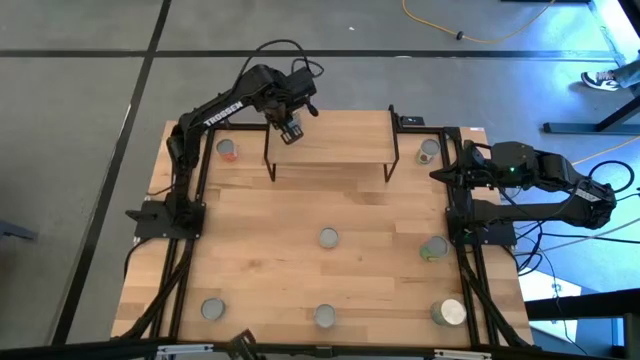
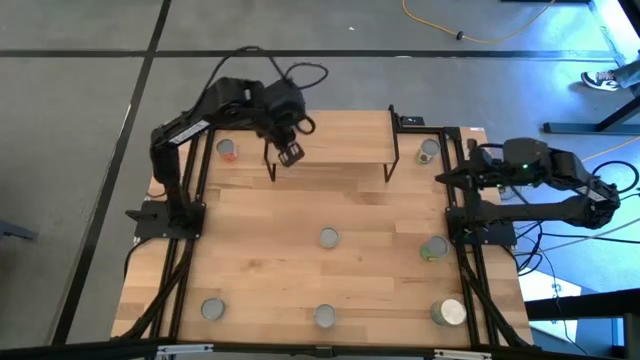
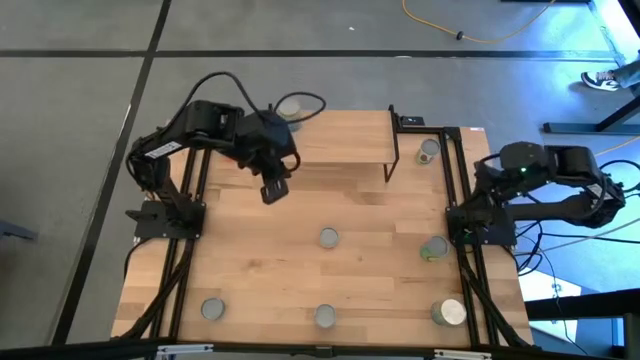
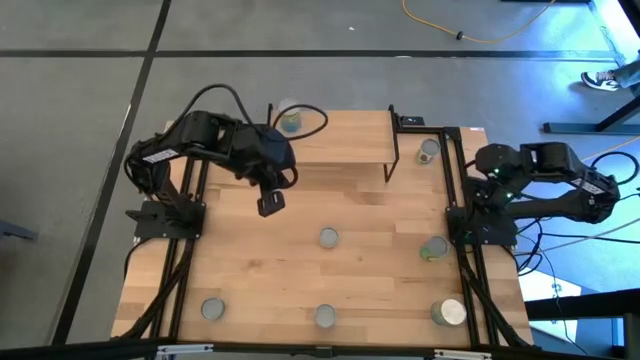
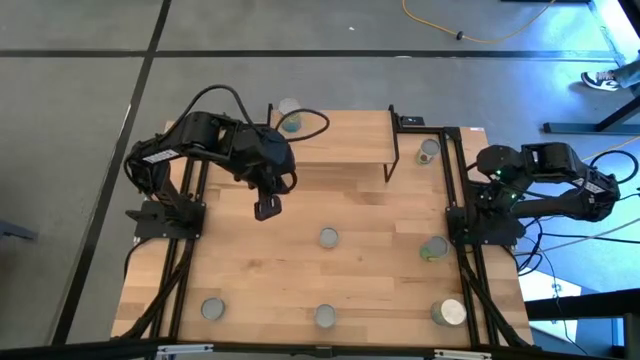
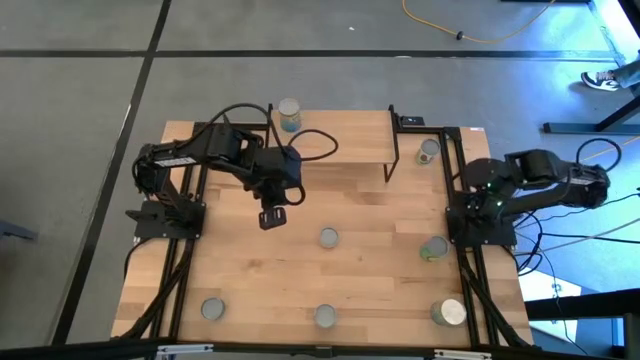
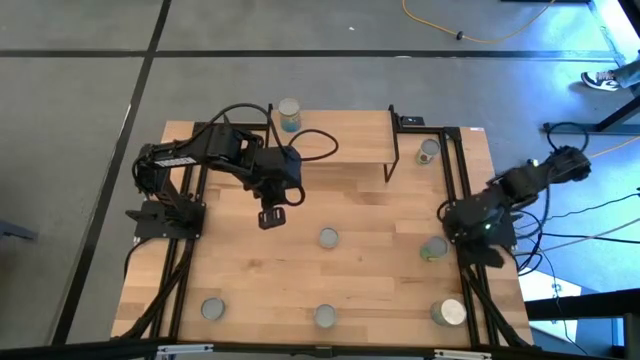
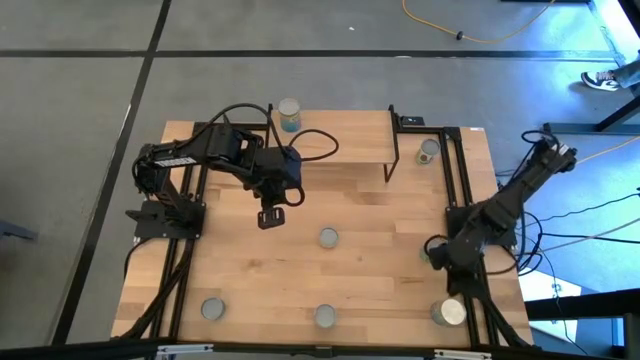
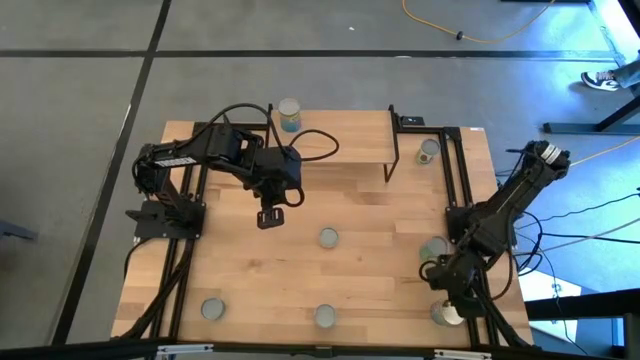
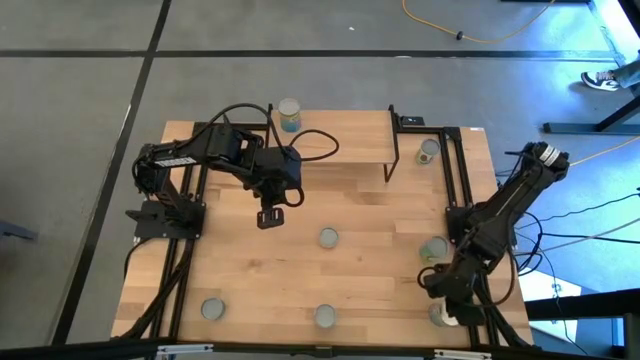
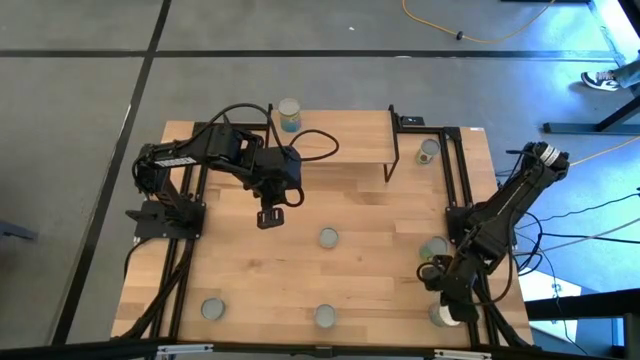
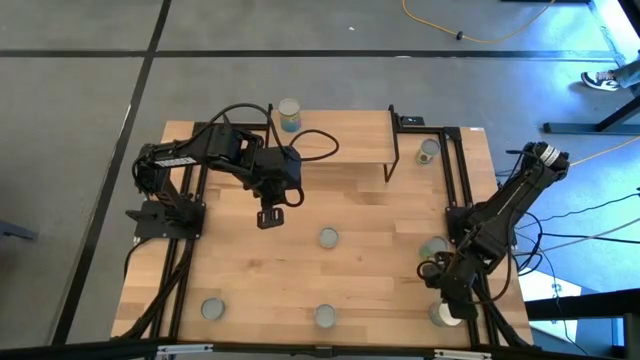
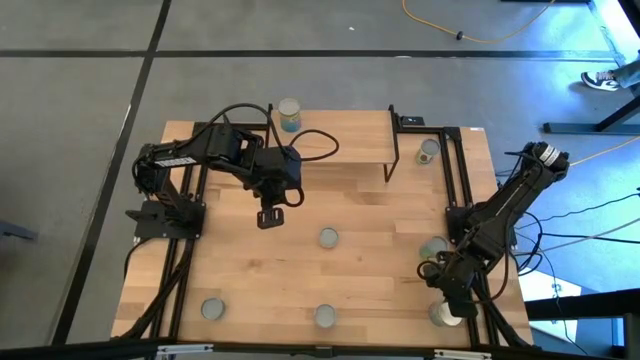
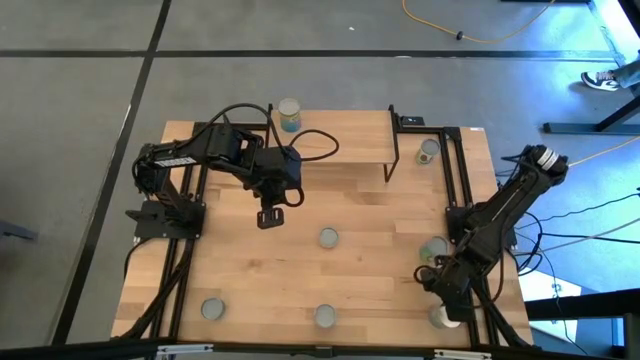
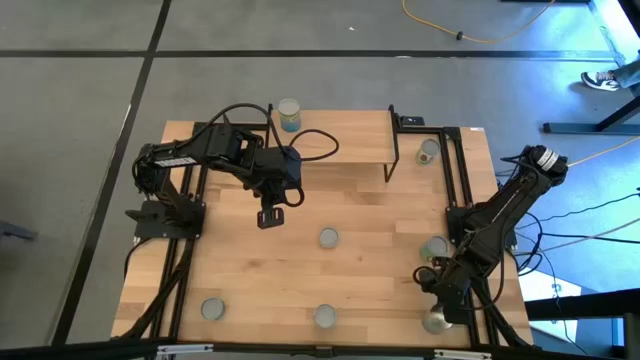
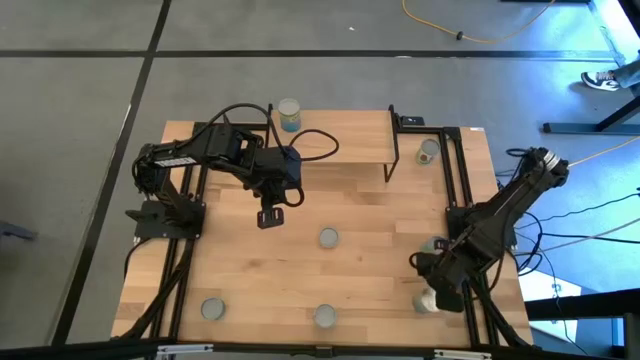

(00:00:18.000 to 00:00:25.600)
Task: Pick and place cans onto a shelf
Put the canned cherries on the shelf

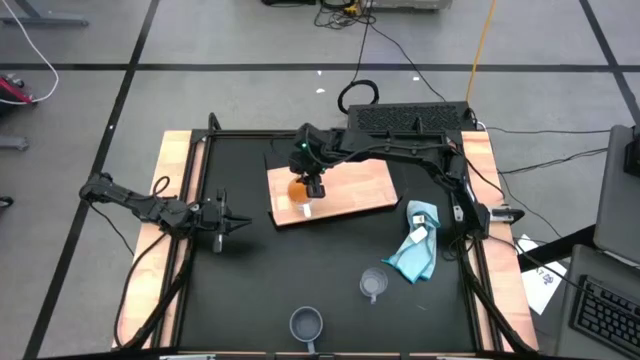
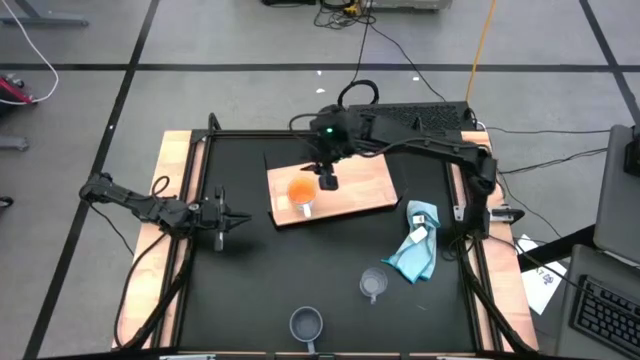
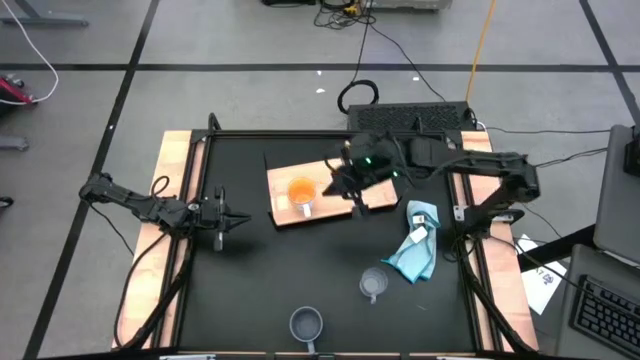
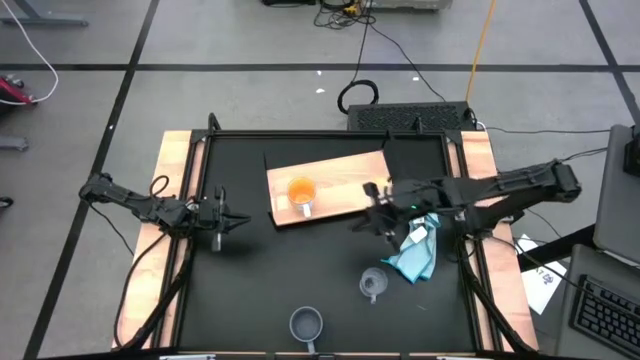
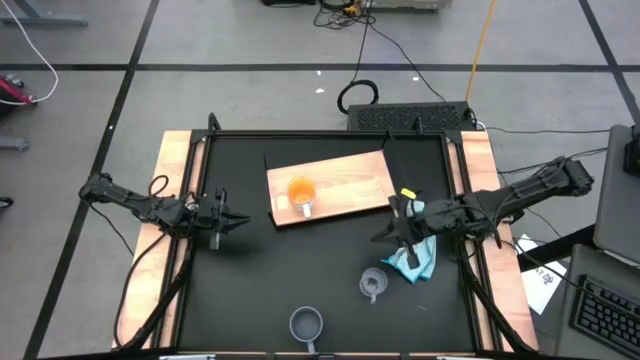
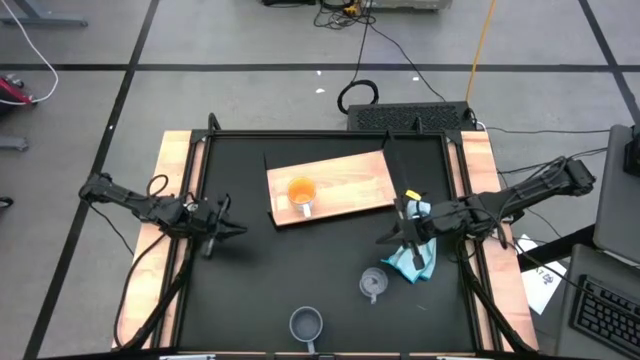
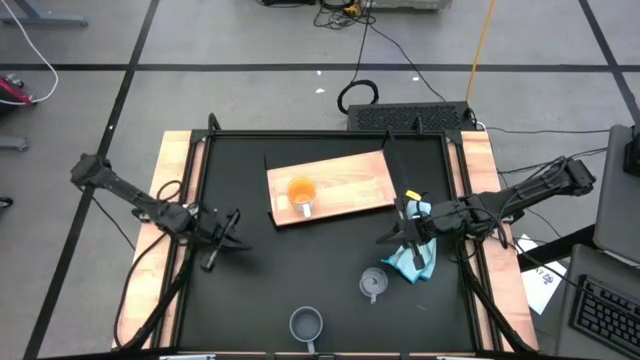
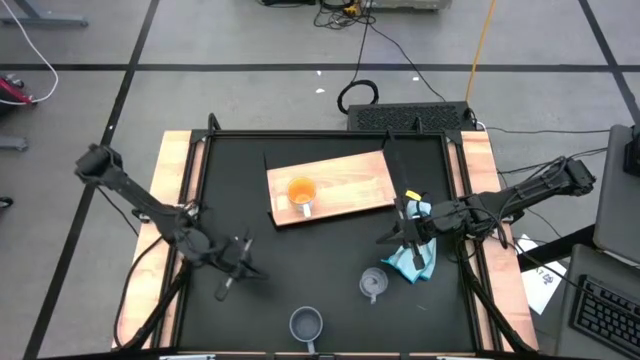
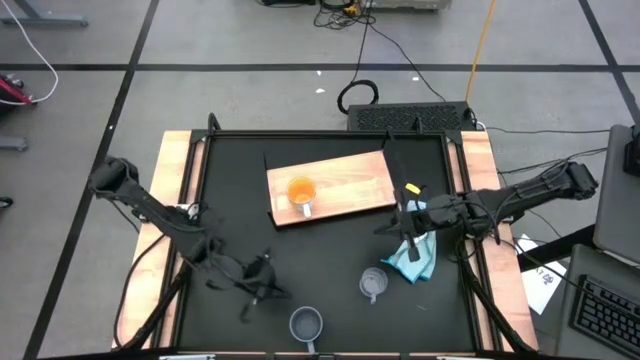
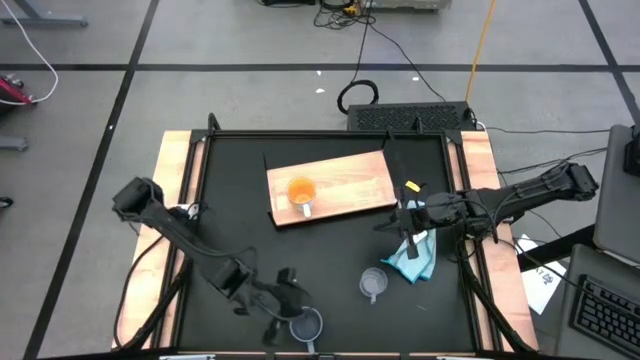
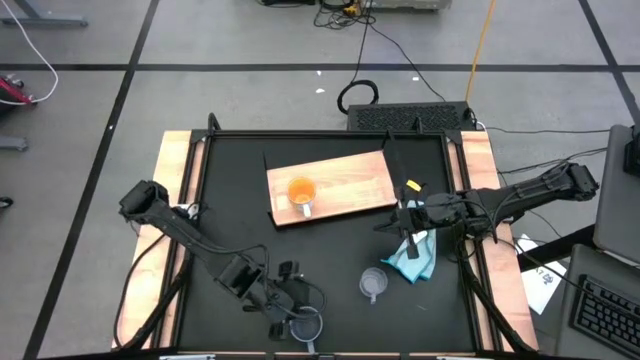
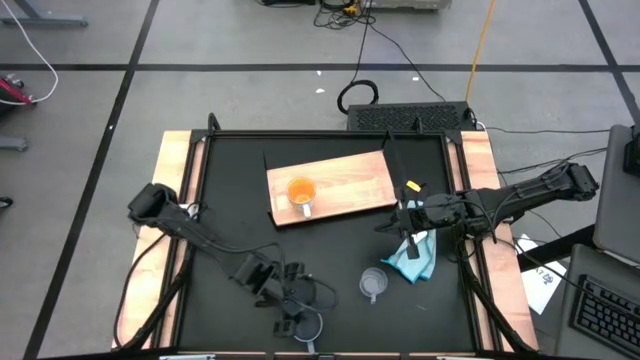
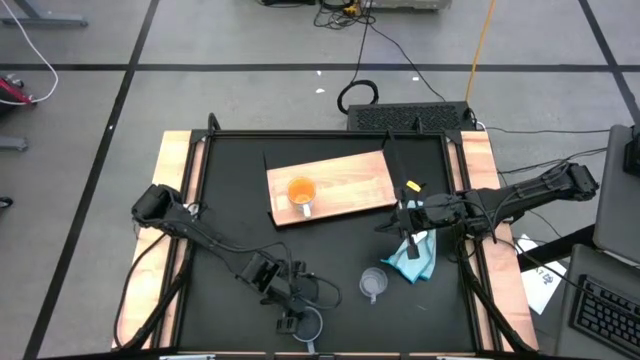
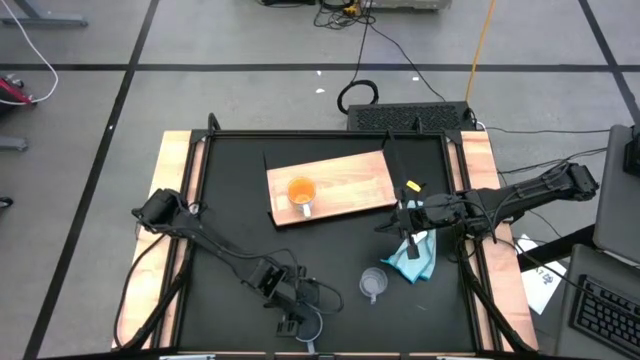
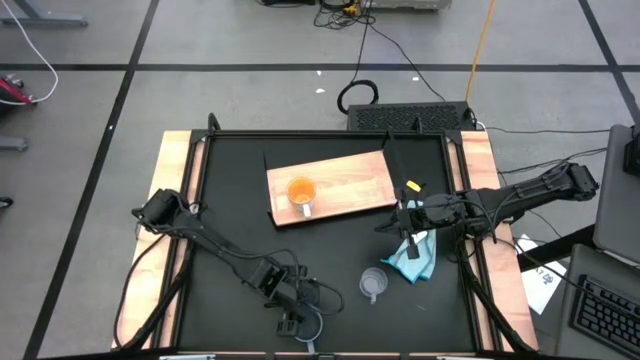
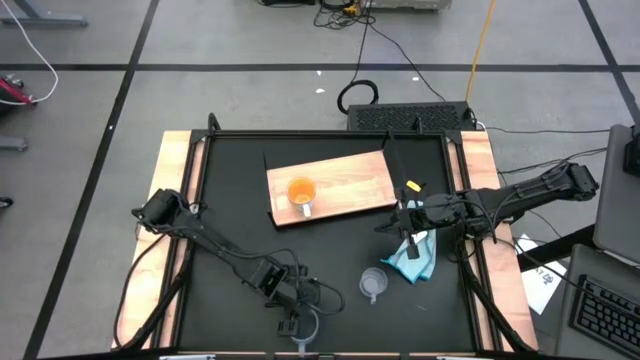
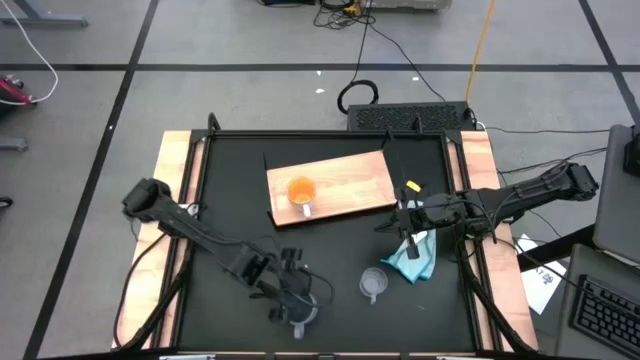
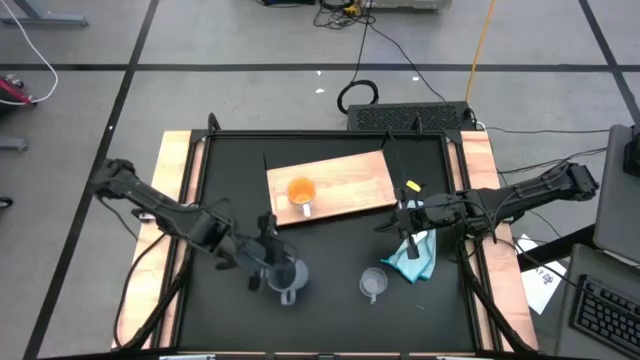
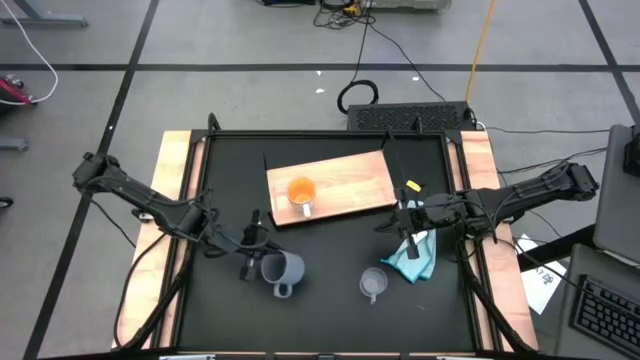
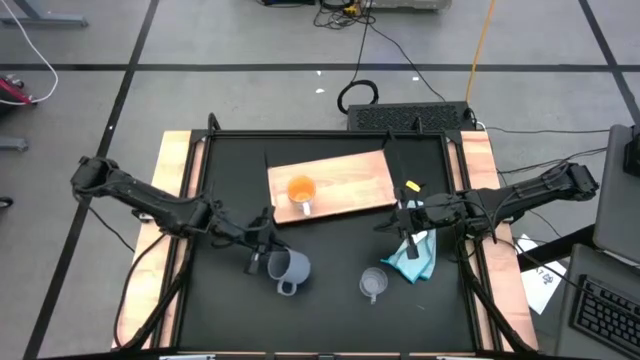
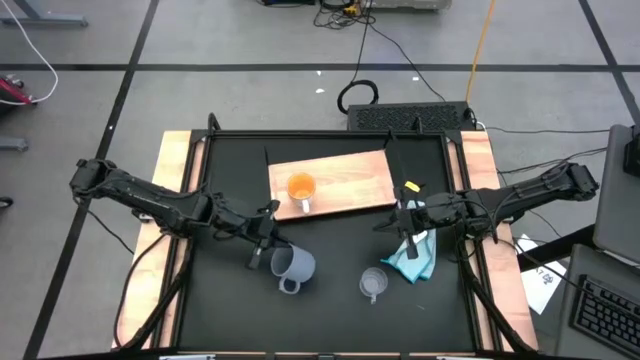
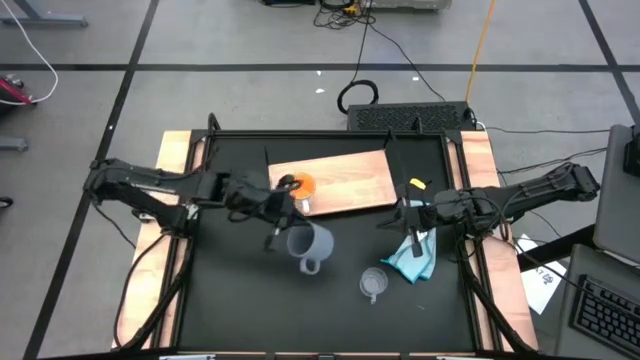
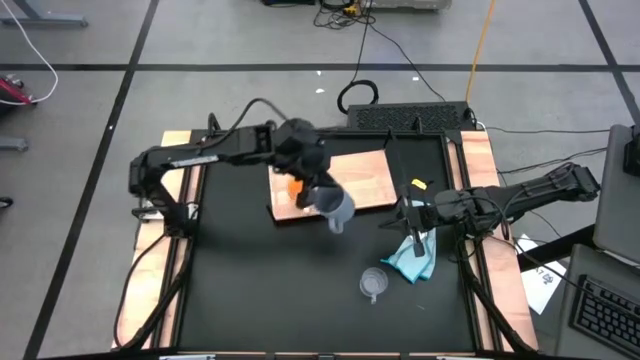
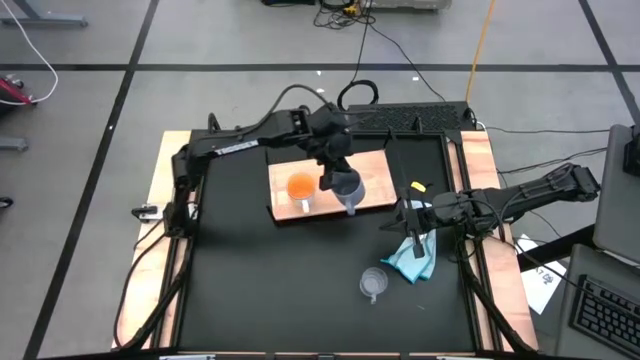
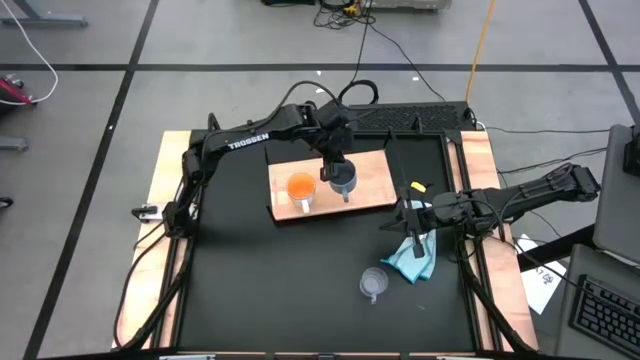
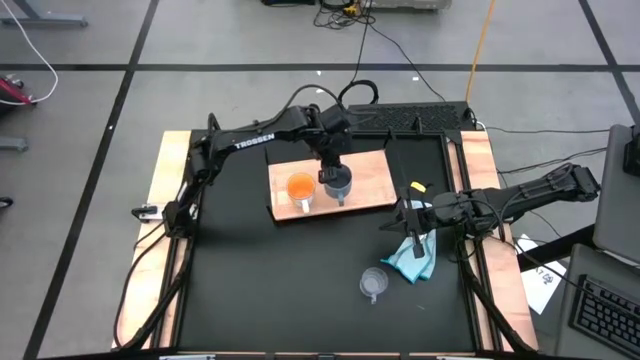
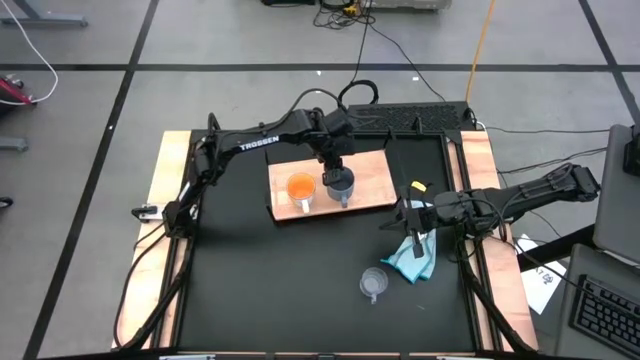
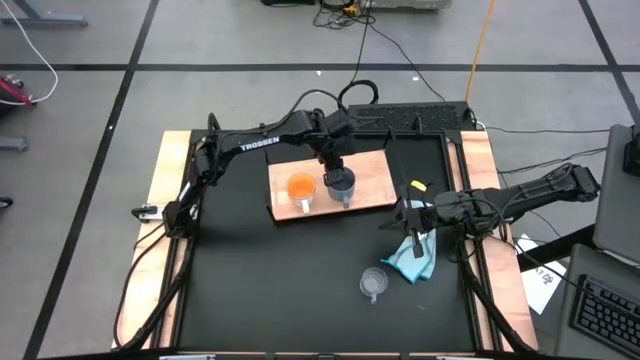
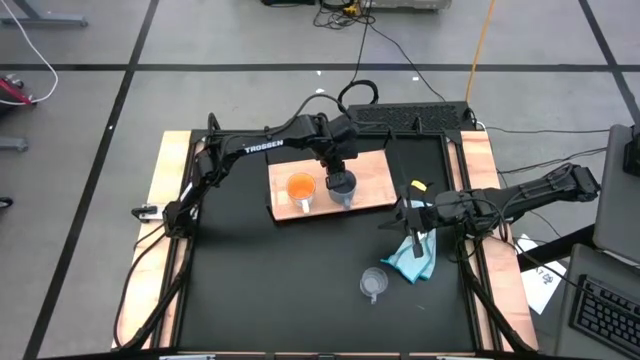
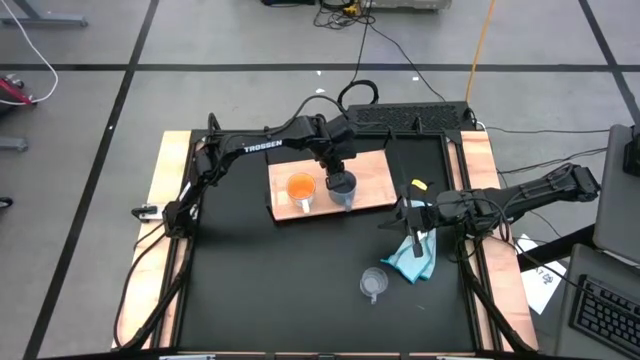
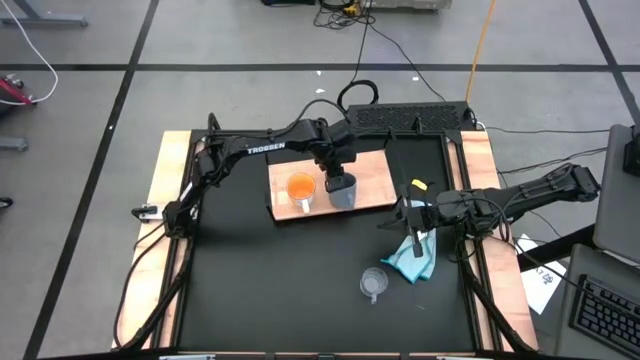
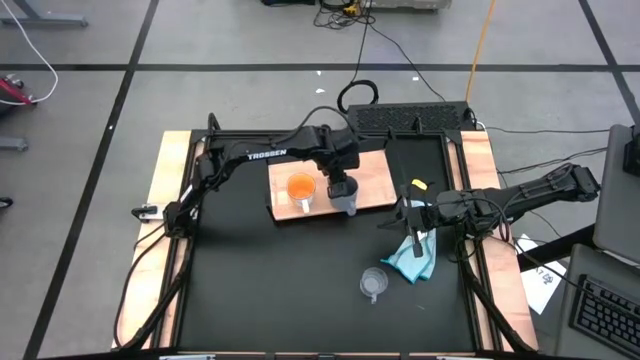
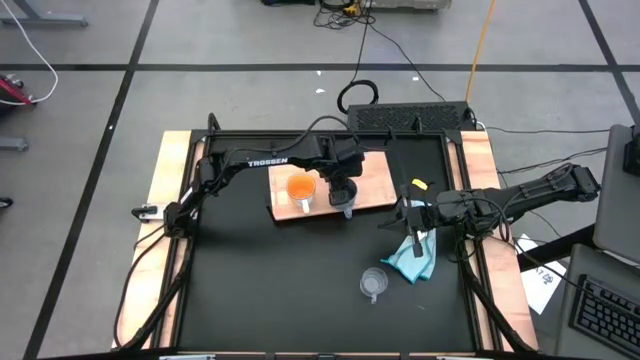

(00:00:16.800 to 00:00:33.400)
Task: Stack small to large cups/mugs on shelf
Put the light blue mug on the shelf
